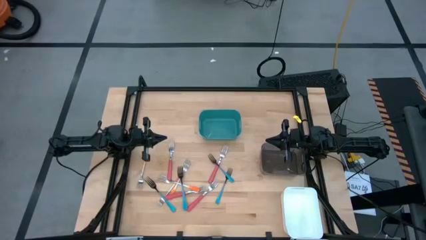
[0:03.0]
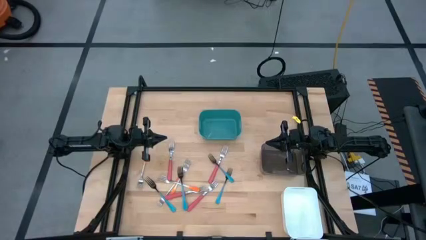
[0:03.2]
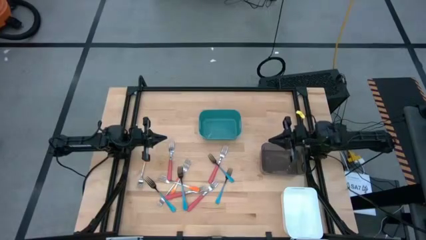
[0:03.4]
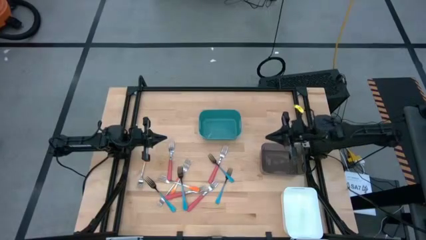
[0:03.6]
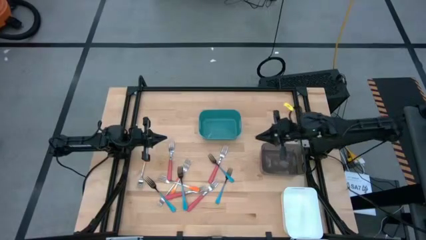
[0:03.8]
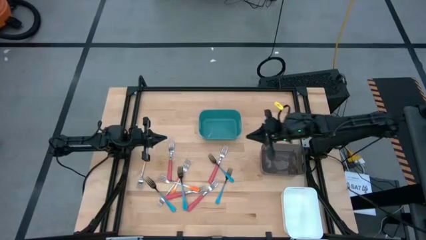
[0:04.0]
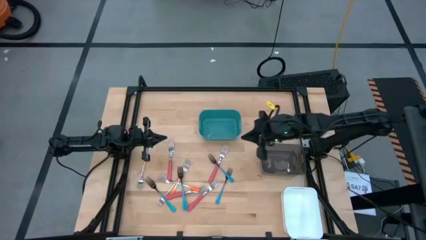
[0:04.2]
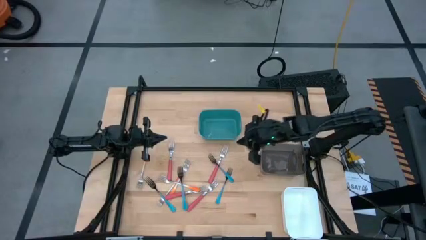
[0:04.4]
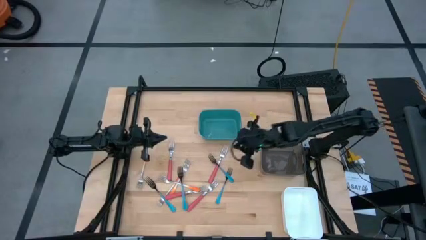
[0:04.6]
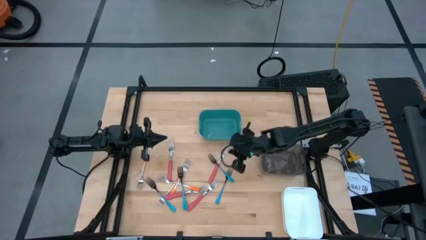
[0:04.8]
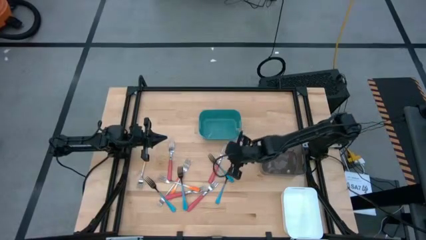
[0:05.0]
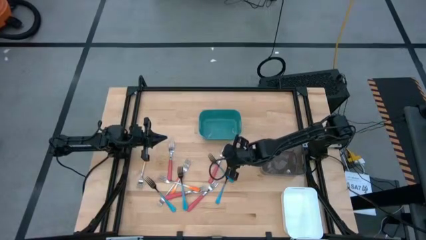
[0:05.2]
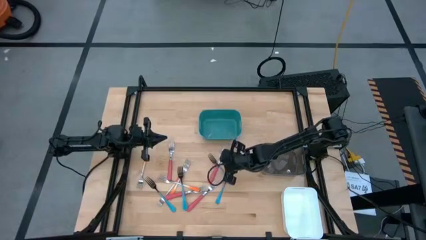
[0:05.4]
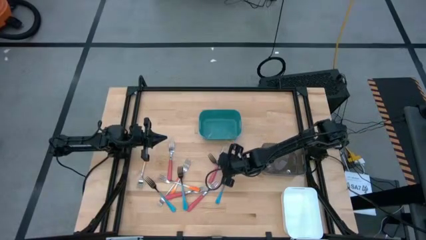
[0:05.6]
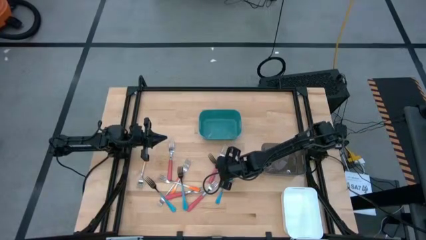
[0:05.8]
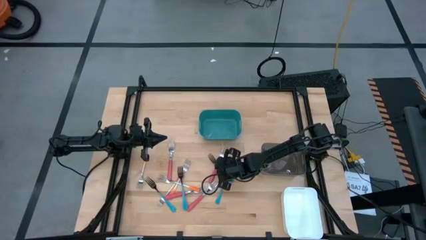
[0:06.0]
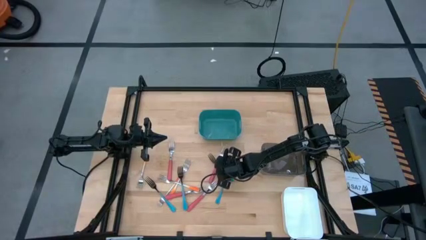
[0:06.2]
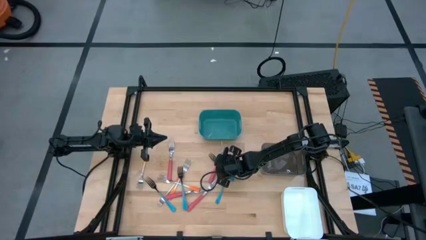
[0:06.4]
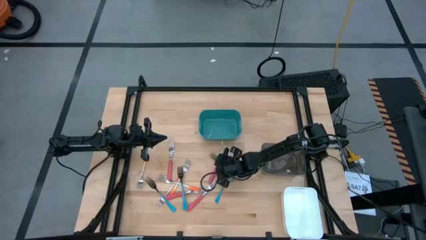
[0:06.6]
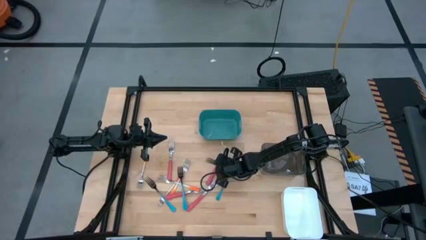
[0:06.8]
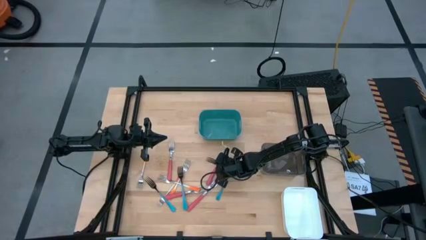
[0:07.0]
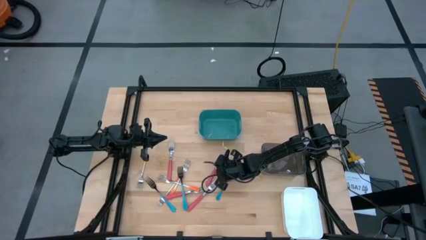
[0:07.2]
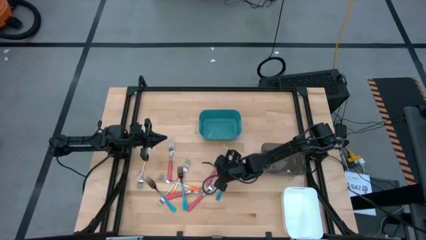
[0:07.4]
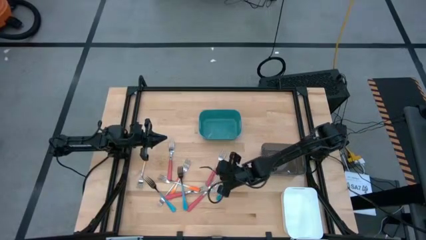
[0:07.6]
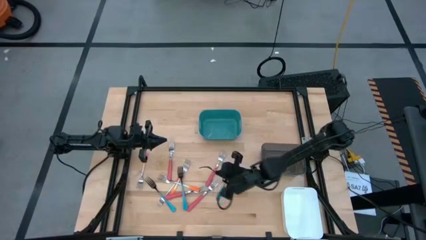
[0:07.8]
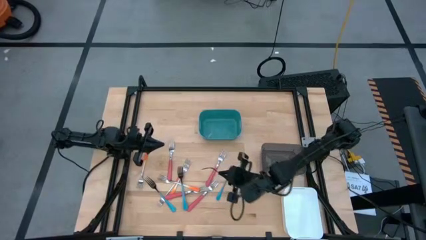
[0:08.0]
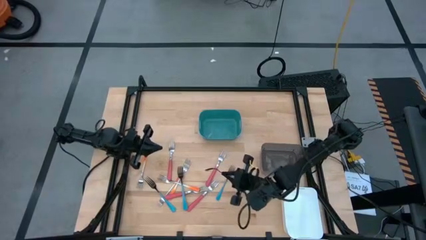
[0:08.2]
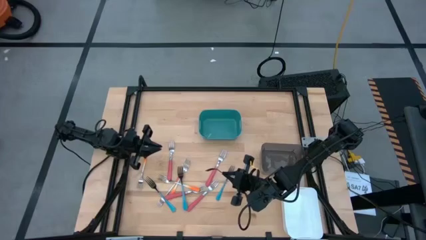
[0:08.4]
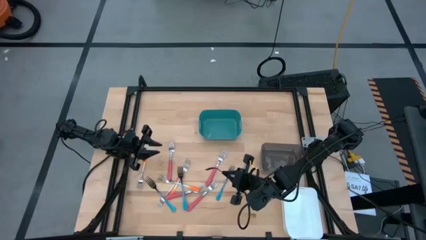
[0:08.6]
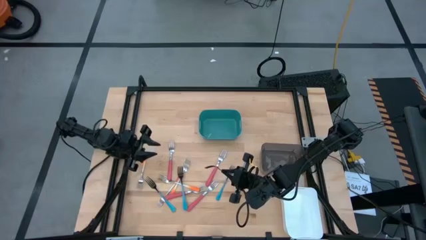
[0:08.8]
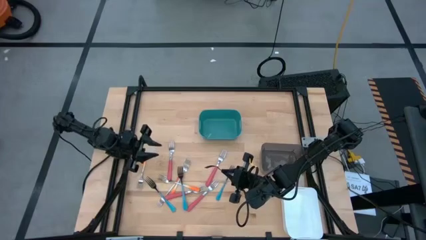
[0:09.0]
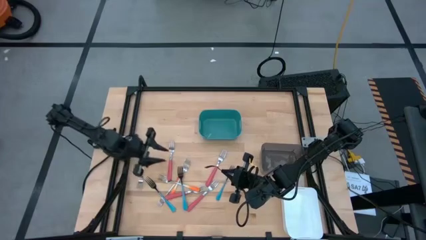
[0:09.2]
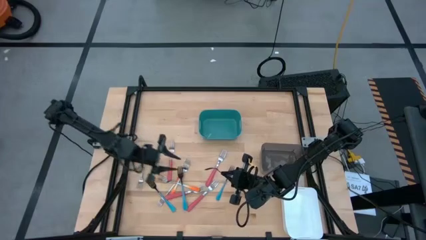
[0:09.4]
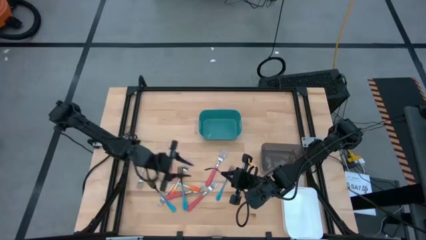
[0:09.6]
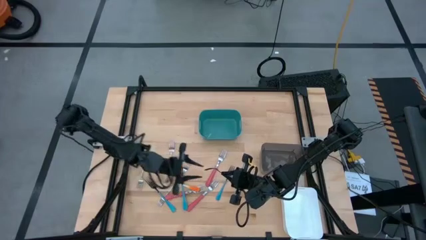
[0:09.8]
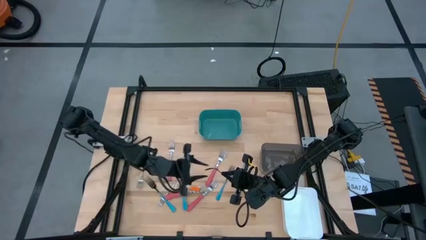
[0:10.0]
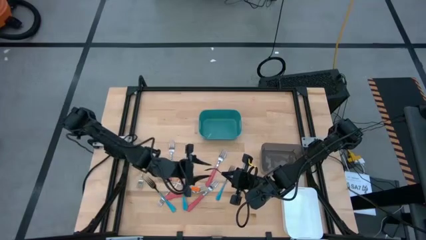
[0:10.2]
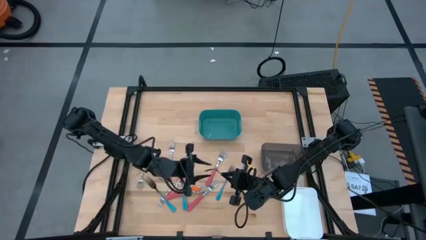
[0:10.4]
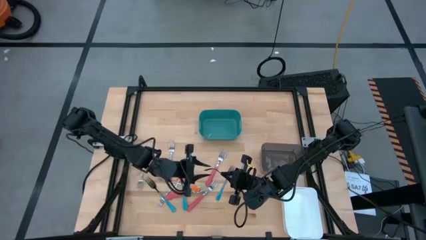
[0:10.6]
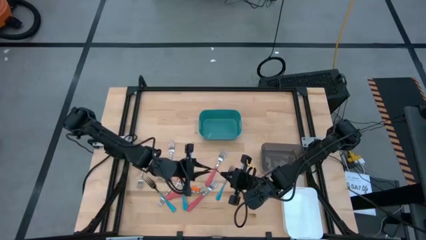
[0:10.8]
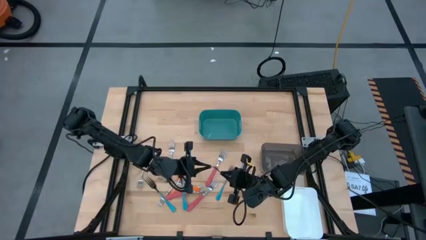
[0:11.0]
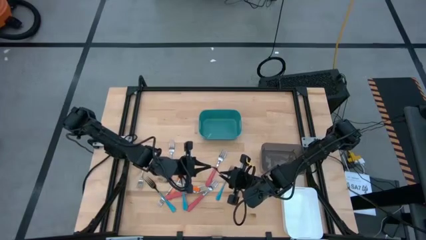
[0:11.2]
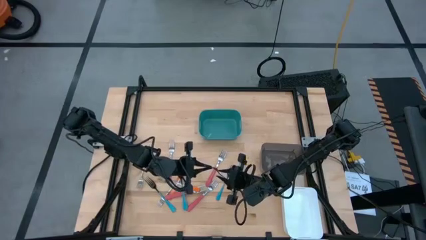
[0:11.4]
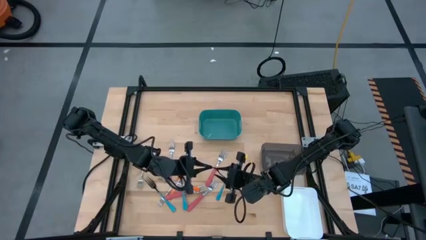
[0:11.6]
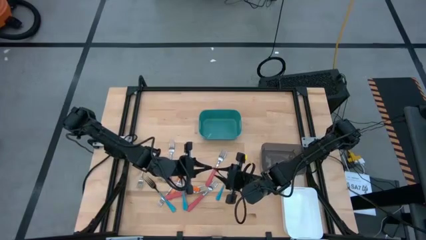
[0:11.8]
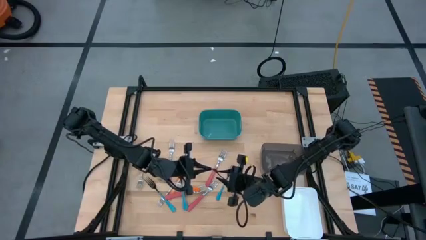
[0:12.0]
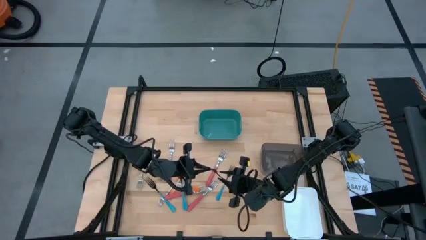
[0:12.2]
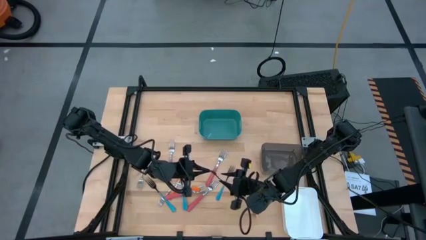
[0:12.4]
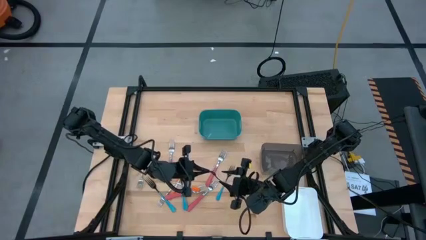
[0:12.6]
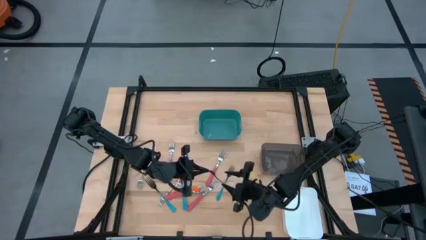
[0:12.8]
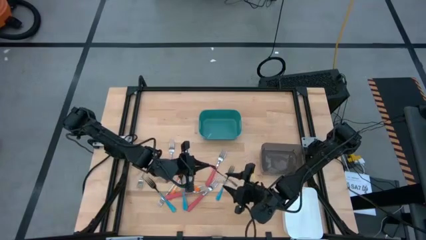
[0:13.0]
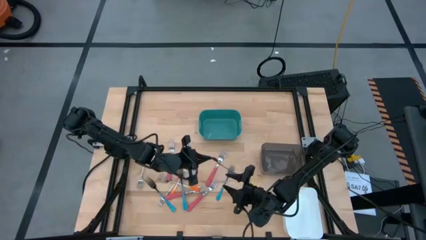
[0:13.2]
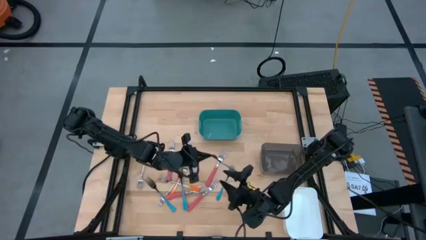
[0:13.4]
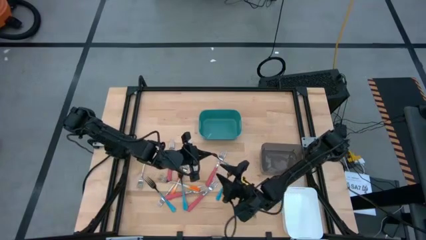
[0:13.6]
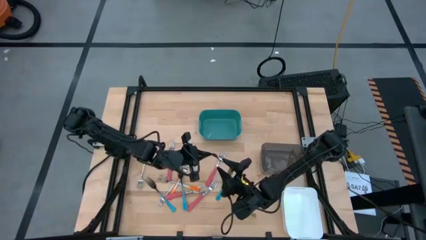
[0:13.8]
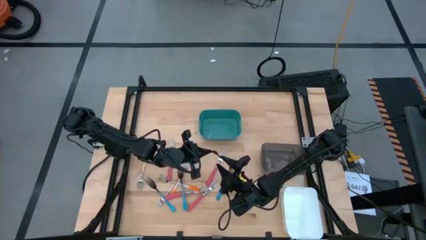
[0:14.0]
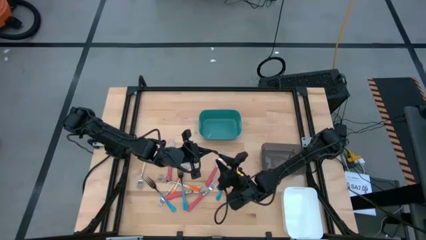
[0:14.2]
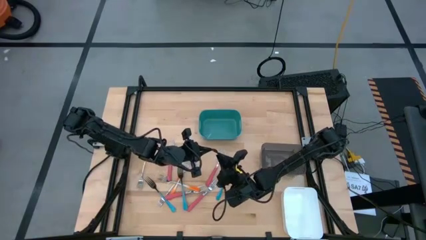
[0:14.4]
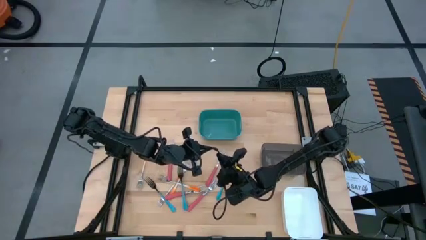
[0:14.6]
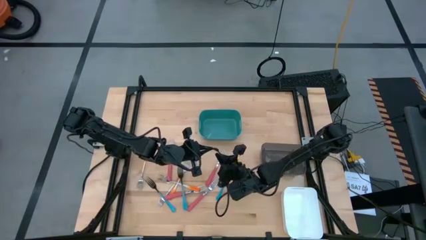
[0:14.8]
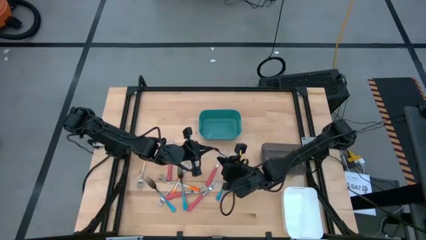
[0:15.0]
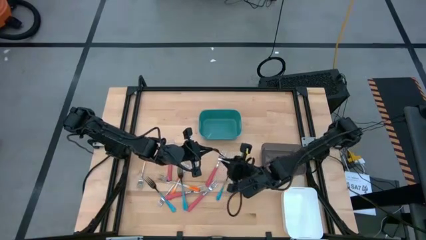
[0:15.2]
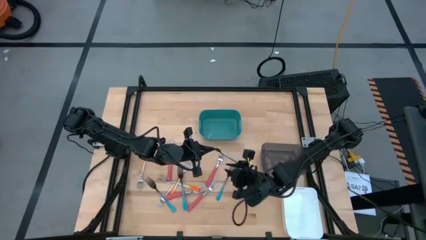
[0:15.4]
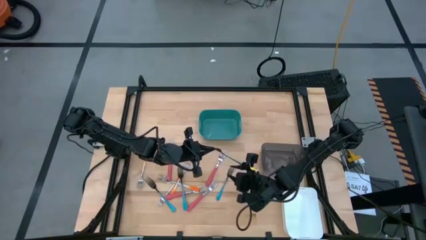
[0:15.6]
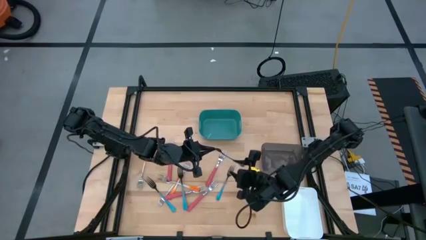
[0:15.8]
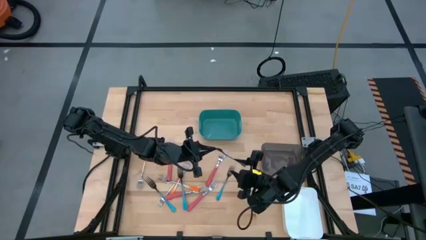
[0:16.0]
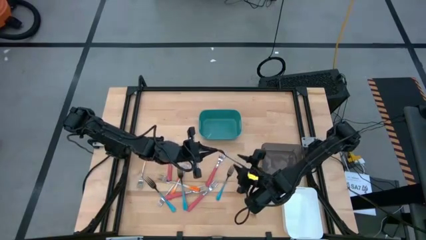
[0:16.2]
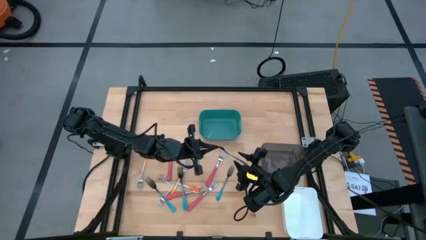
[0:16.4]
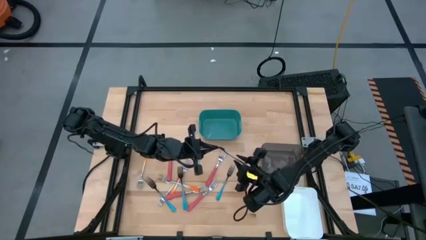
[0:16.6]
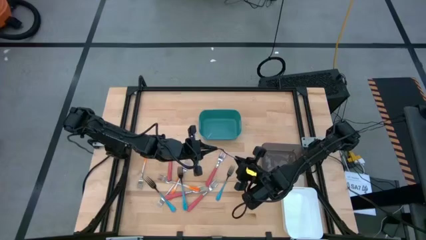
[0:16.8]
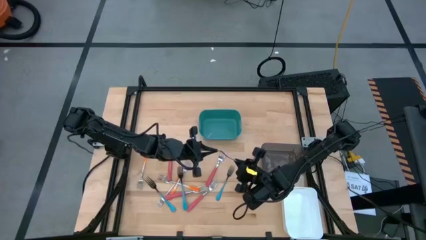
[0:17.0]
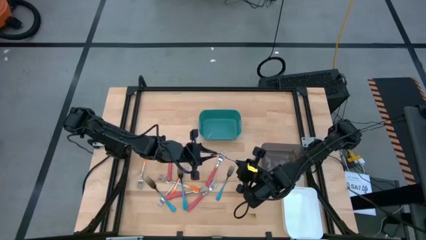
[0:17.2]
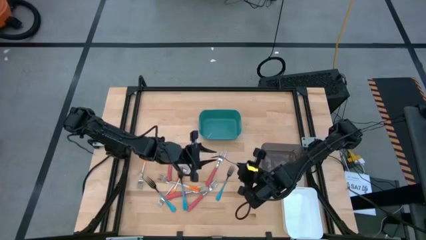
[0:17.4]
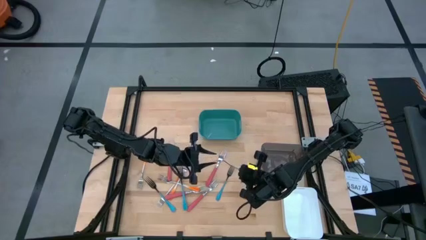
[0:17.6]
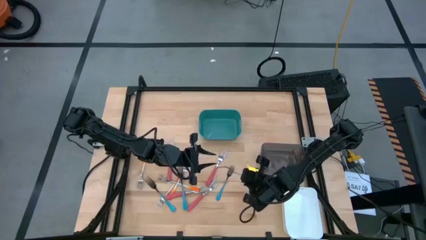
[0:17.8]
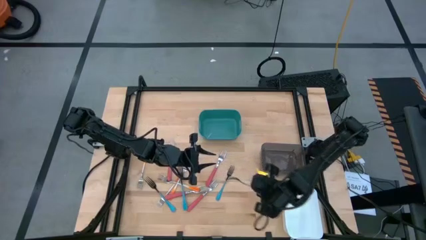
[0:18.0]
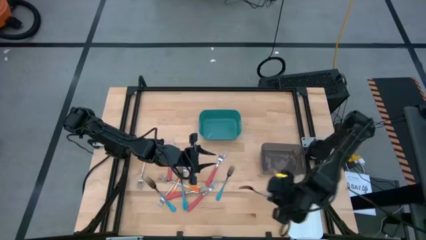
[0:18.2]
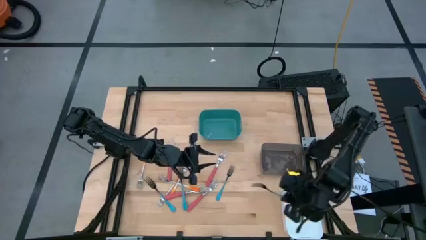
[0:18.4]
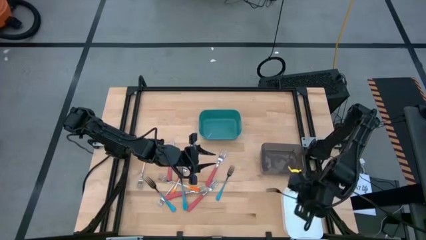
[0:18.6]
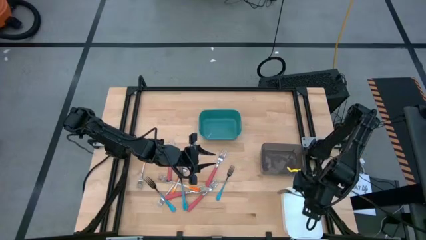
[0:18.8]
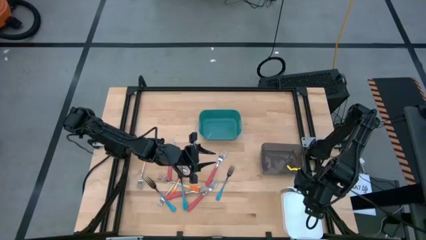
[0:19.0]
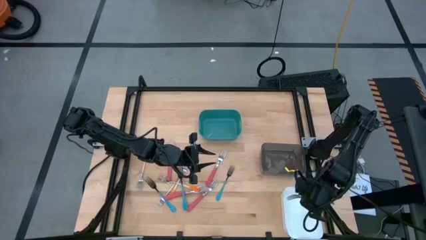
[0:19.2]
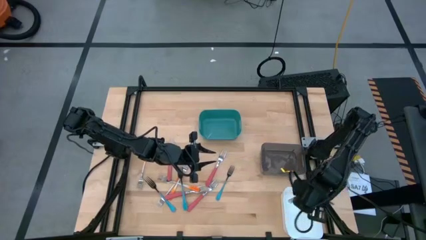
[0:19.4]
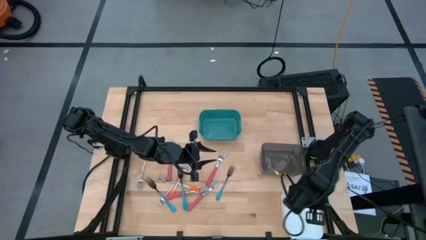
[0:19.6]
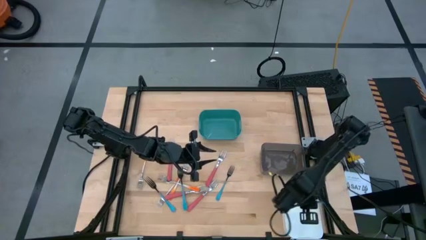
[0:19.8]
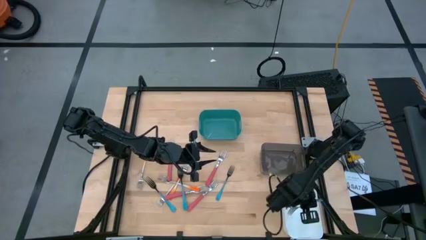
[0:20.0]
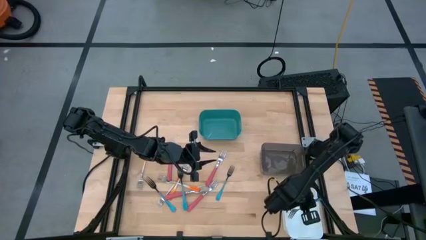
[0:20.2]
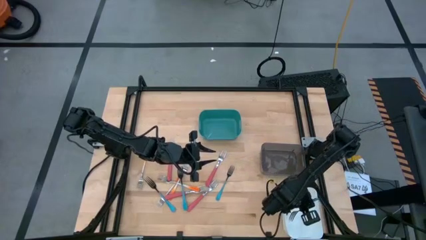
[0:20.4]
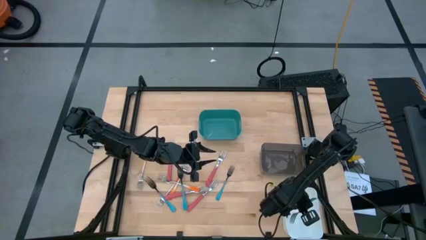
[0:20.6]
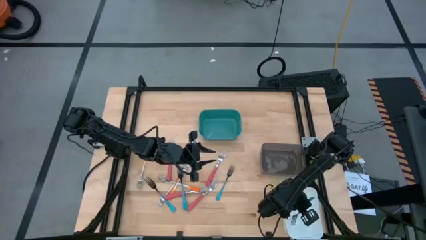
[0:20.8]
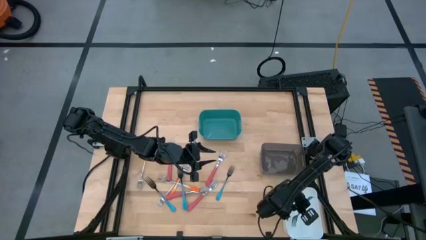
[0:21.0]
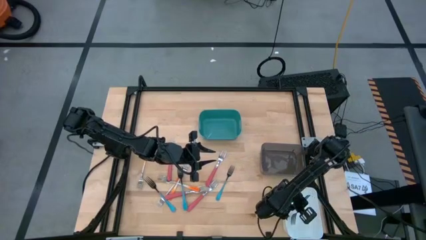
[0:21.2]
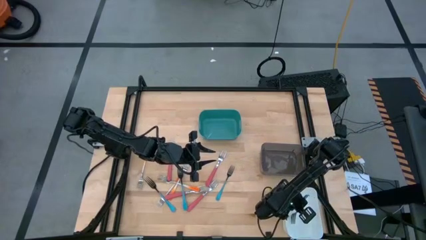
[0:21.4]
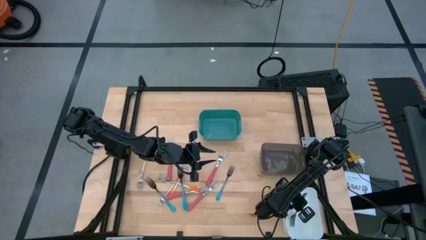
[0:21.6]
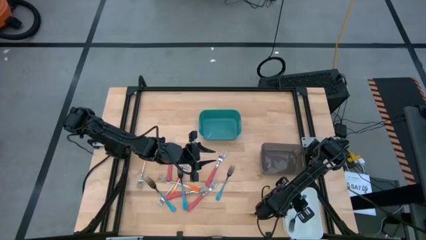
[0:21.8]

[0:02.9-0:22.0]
Task: Sort silverware by color (type)
Put the blue fork into the white bin
